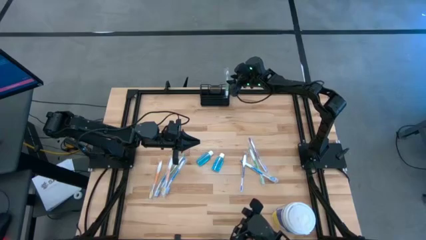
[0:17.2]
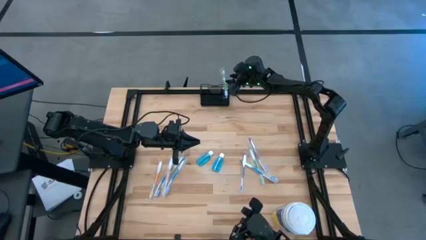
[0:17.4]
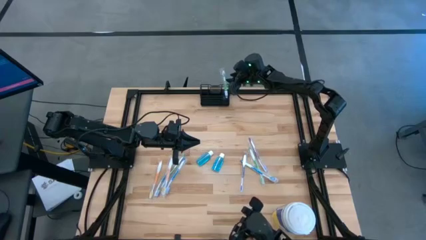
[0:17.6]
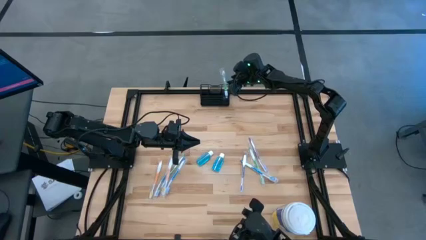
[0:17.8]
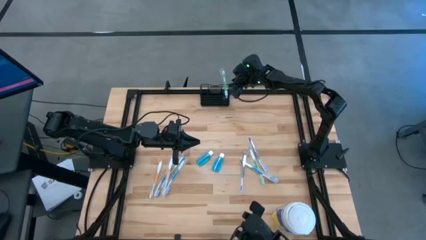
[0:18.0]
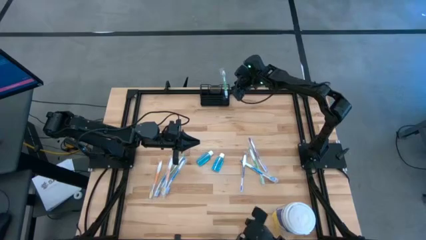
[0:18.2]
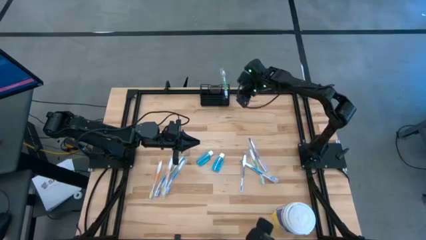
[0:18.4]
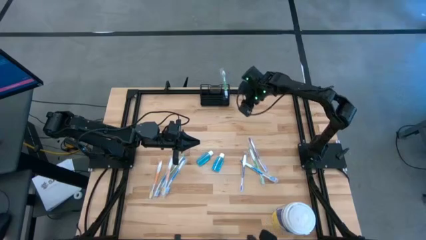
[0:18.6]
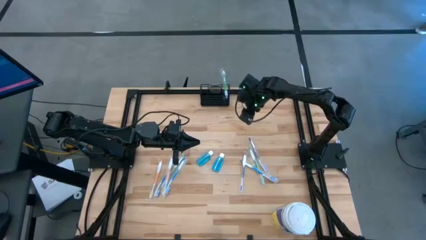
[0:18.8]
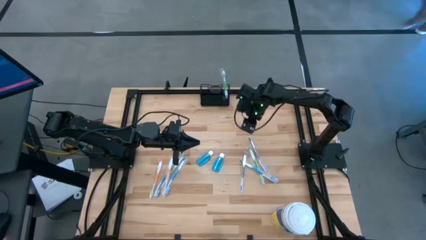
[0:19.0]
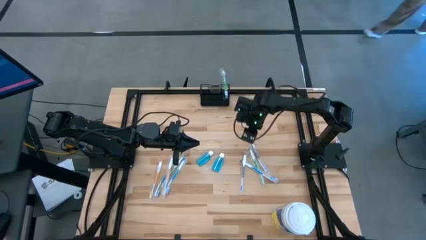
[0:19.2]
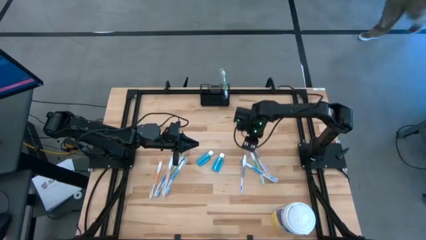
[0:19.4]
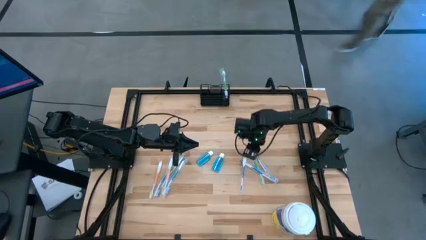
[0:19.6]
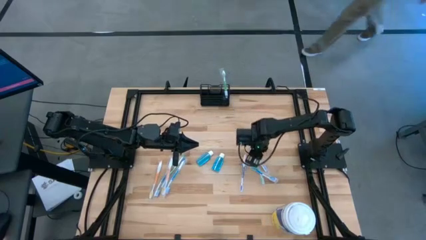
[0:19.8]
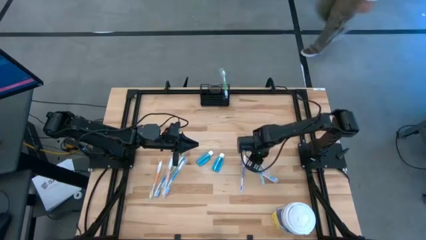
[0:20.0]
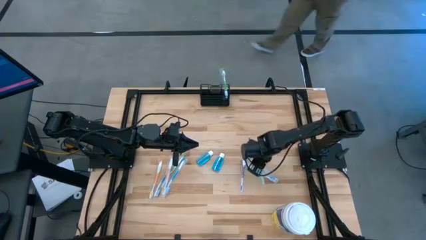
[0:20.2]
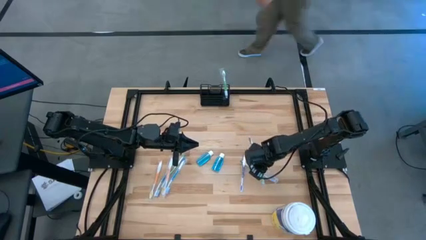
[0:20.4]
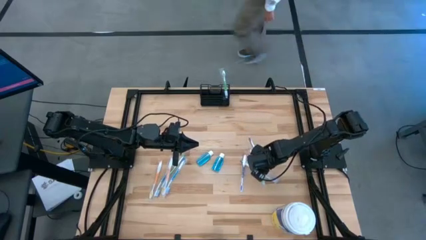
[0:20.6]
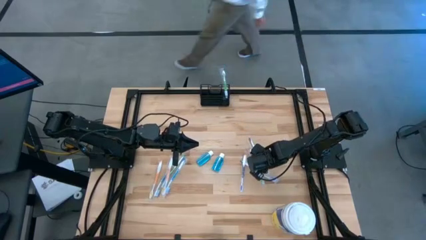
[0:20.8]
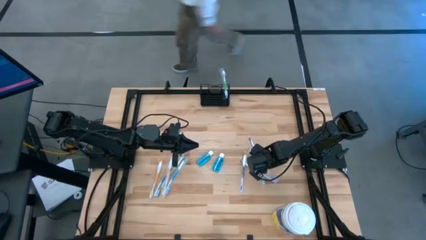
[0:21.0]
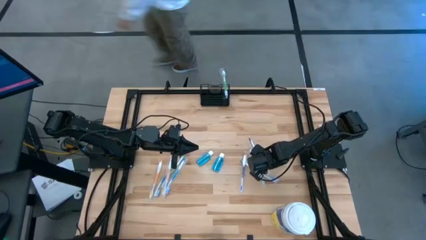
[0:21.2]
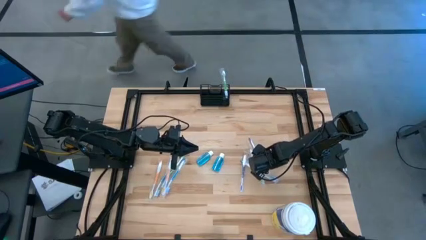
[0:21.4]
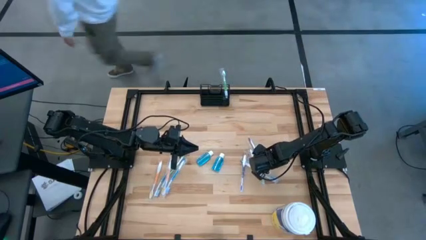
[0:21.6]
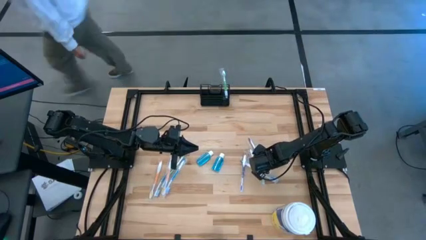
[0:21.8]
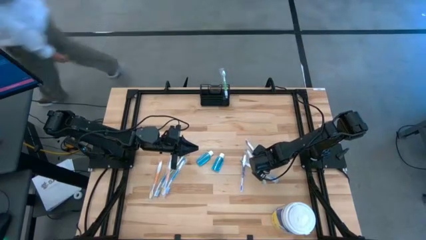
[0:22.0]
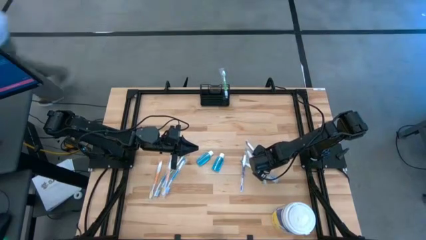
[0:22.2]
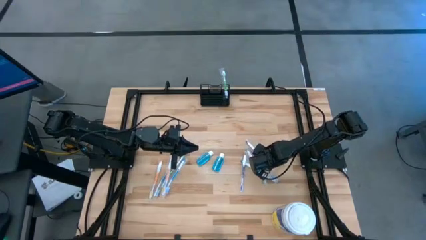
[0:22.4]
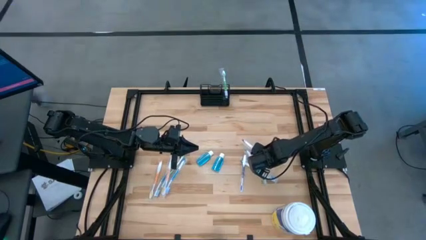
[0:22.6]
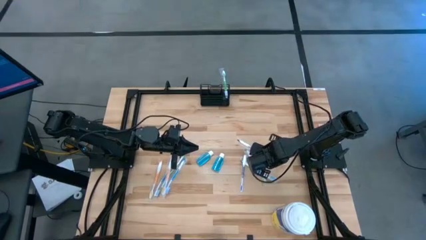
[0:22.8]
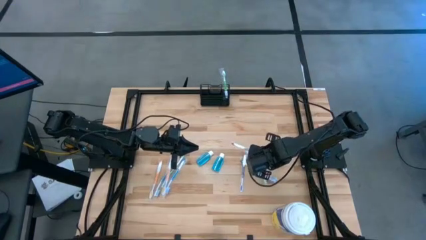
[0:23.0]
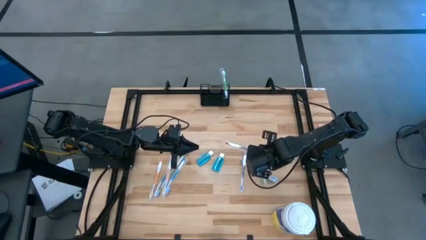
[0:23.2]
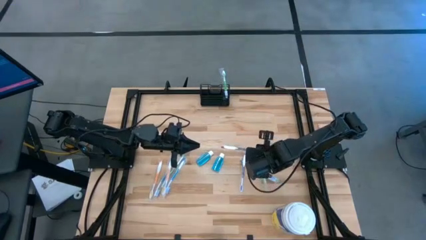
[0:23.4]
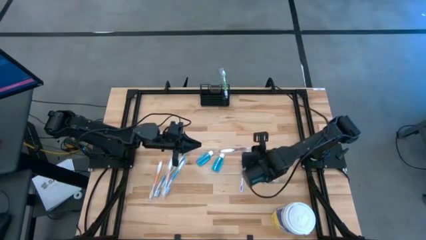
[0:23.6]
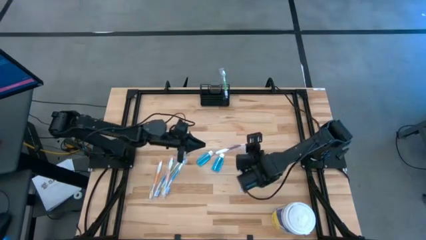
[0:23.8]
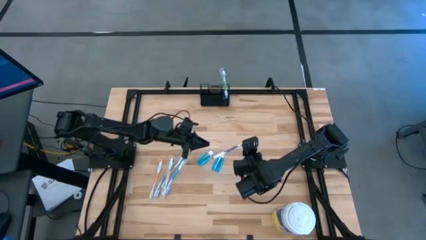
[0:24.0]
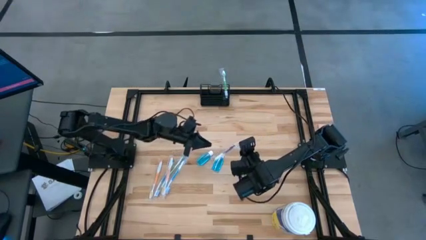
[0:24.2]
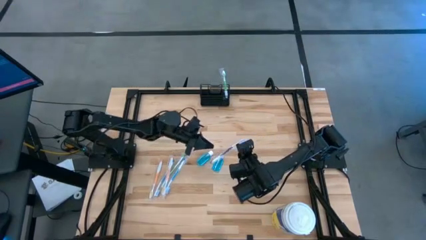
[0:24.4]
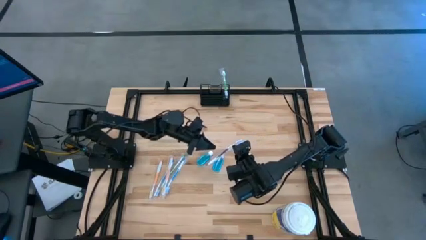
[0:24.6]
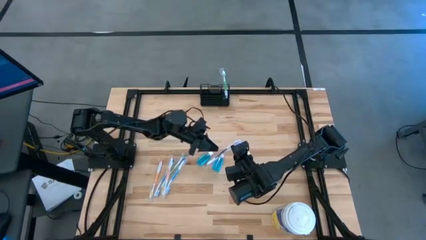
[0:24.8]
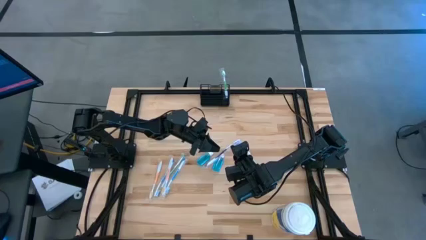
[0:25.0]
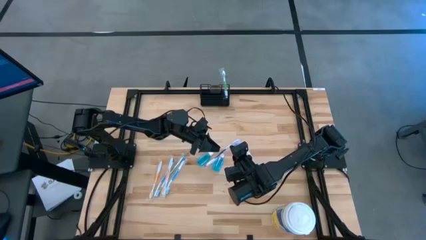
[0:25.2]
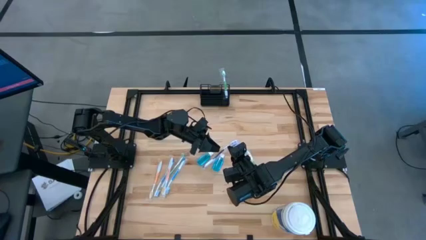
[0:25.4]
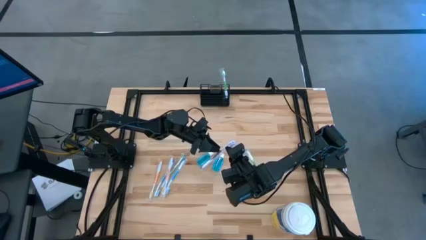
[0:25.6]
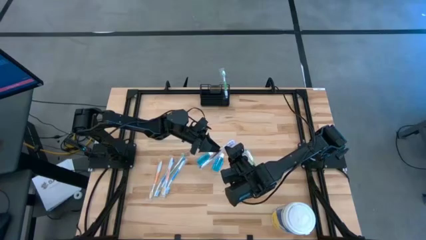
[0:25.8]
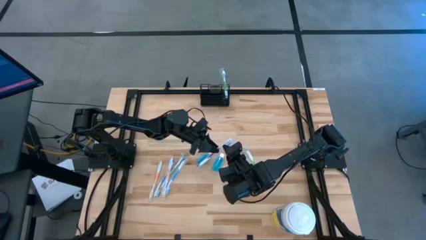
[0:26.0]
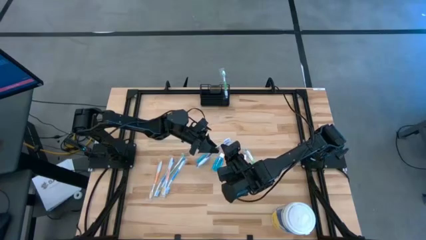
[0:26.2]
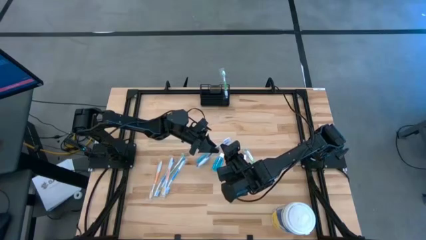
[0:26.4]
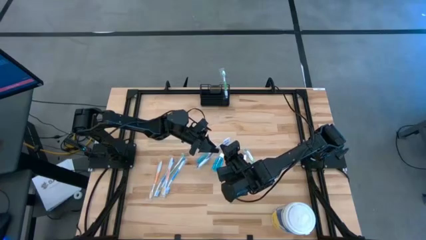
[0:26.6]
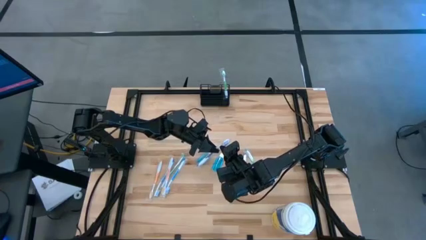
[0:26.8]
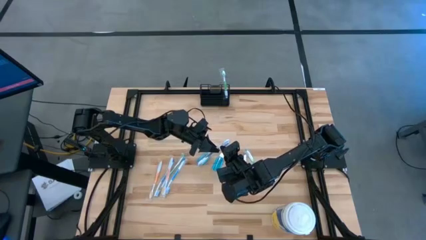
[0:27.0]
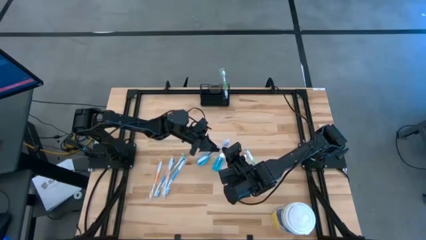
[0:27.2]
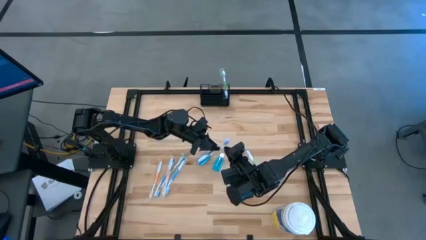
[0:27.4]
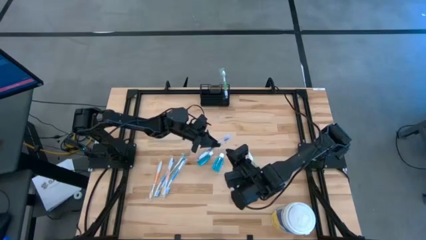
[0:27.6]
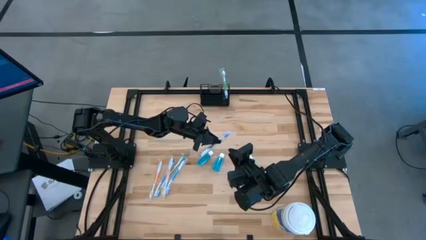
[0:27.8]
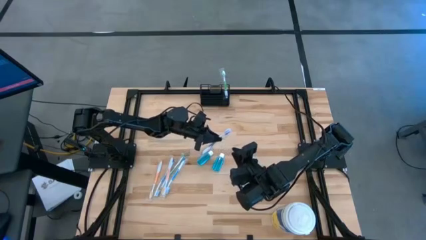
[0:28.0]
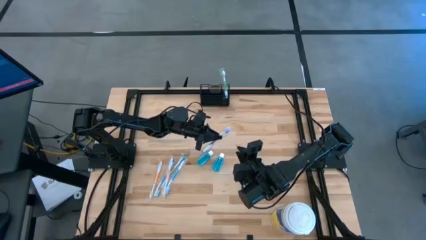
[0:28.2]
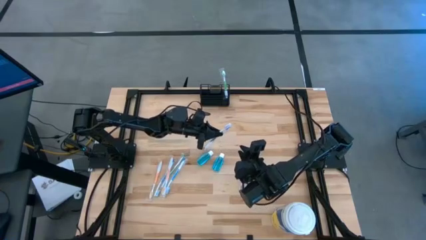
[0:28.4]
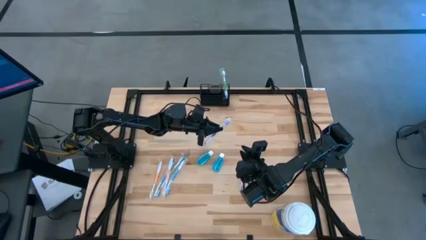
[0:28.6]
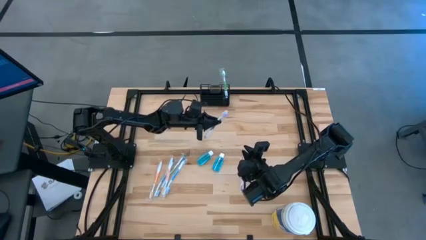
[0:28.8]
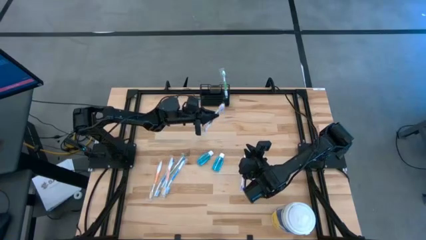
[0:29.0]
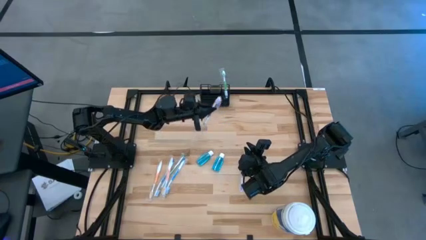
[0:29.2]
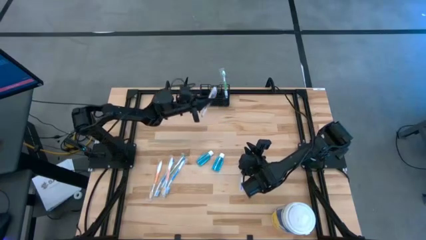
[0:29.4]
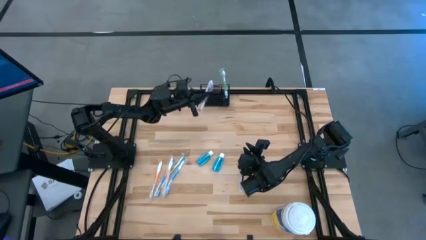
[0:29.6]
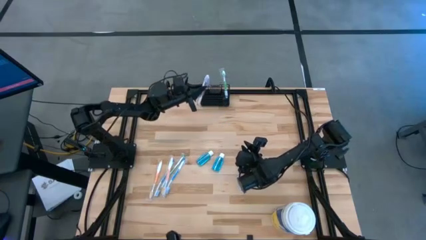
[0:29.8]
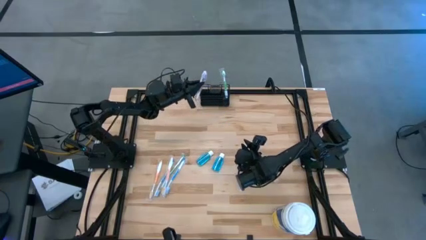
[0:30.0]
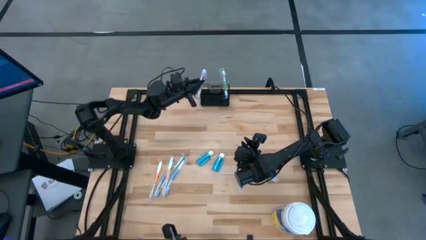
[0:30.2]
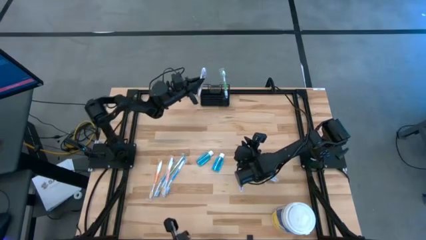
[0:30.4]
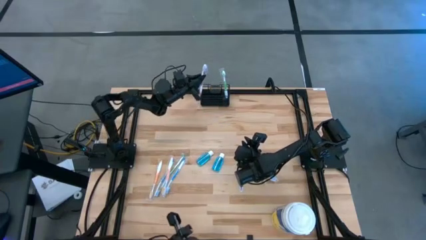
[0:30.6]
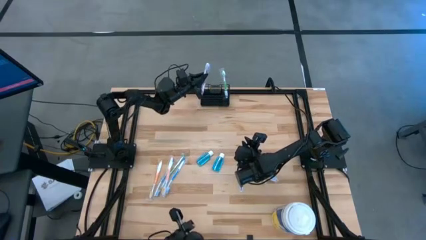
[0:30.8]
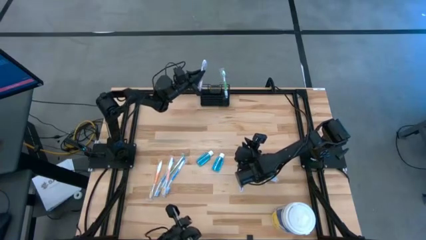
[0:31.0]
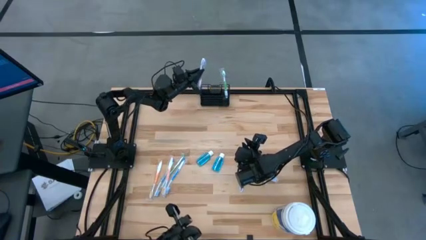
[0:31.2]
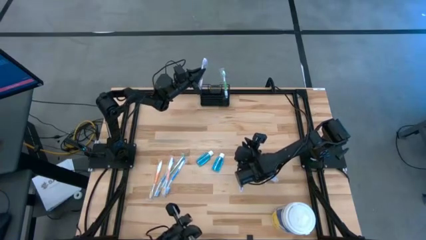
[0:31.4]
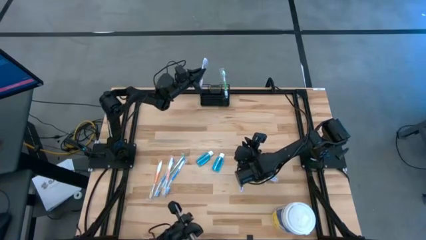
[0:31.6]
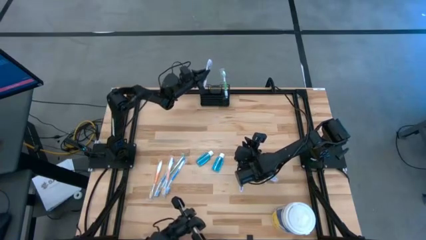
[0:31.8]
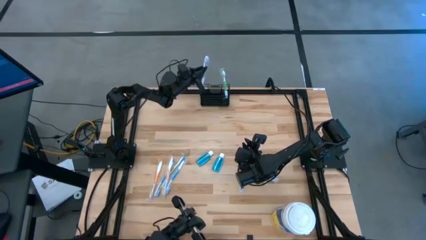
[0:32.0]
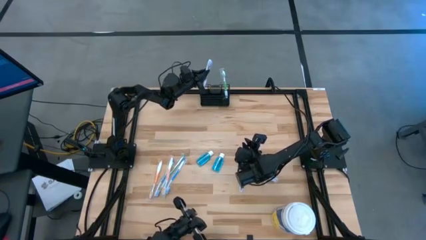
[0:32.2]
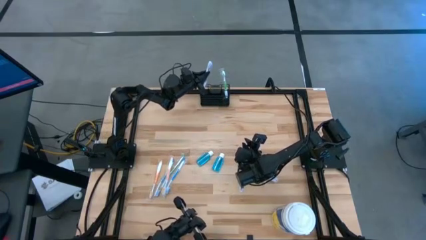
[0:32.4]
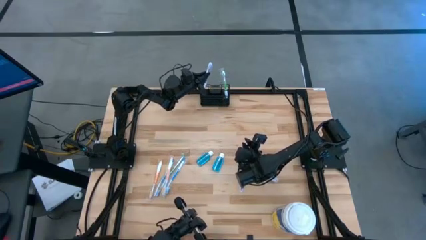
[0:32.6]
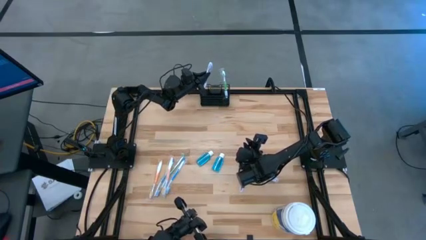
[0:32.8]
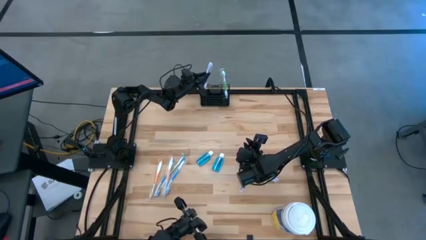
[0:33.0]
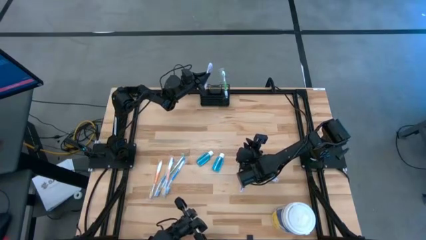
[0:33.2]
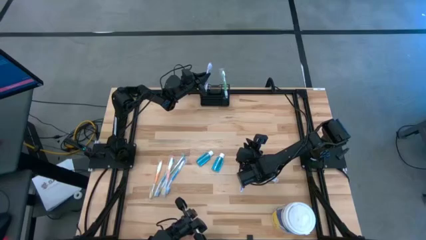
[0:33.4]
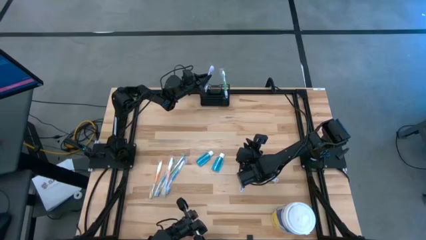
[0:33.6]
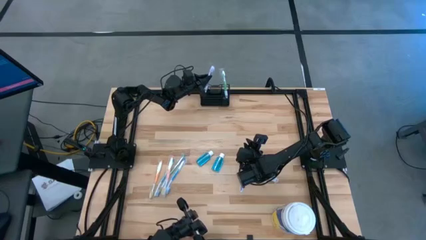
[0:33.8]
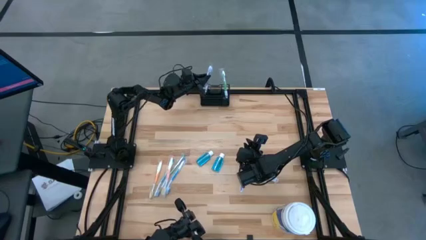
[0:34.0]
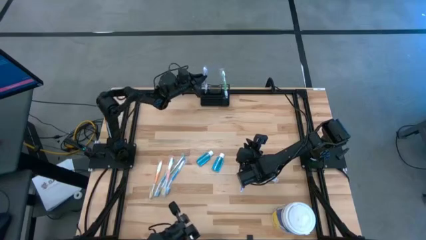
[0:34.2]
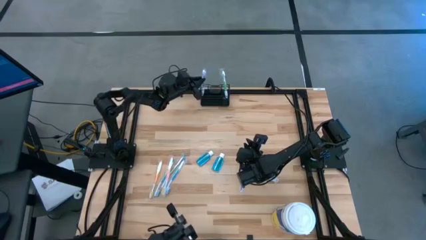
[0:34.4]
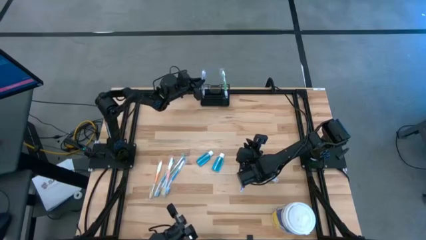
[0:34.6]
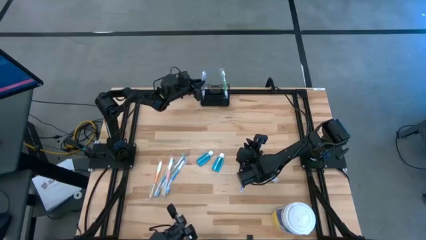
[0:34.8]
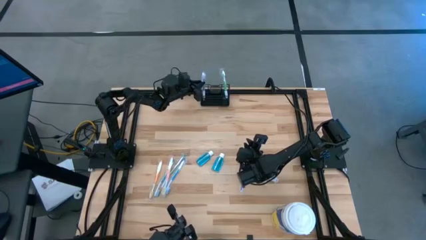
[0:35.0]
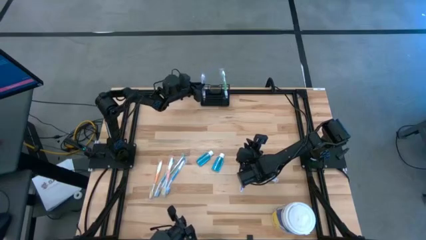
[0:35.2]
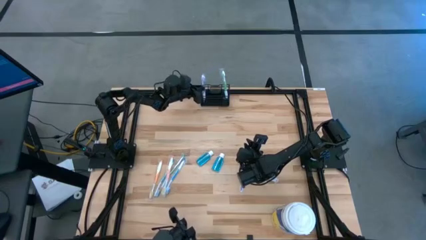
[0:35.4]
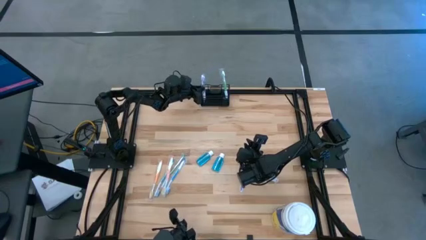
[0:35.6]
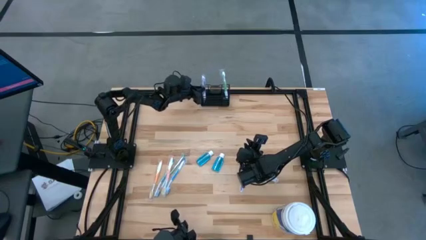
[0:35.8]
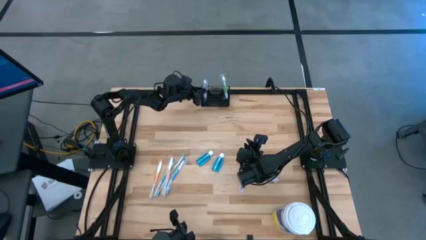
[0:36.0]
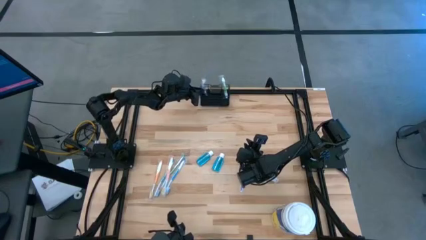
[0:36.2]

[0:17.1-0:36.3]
Task: Pick & Place toothbrushing station
Put the right violet toothbrush into the black wire organizer
